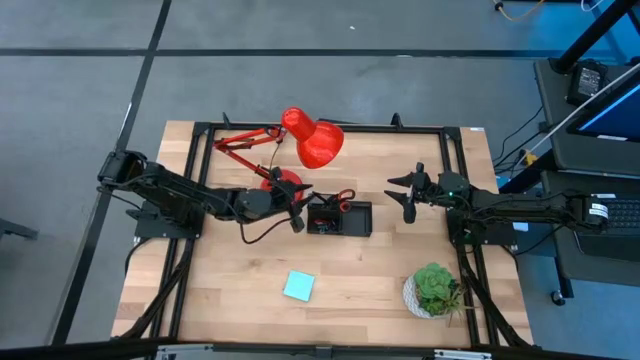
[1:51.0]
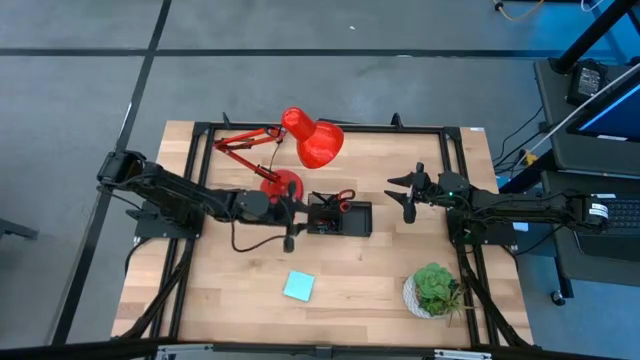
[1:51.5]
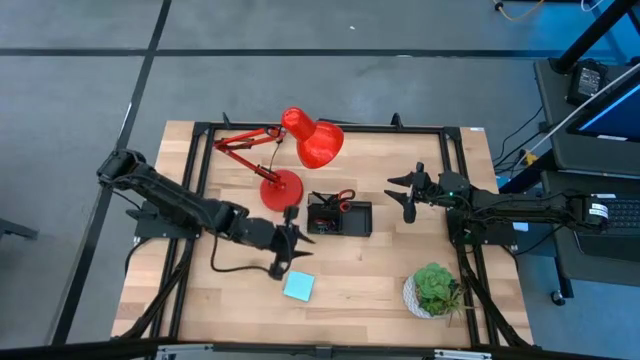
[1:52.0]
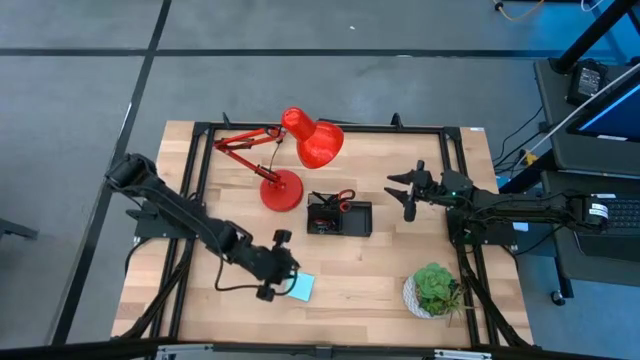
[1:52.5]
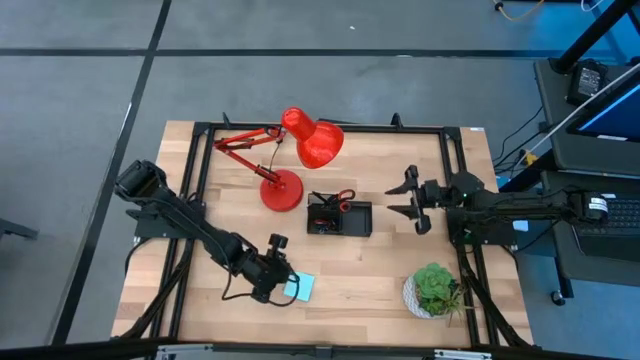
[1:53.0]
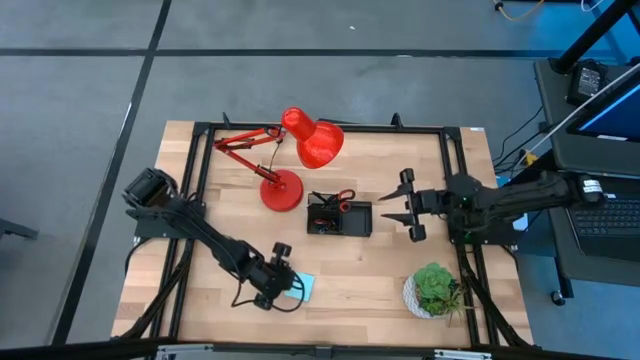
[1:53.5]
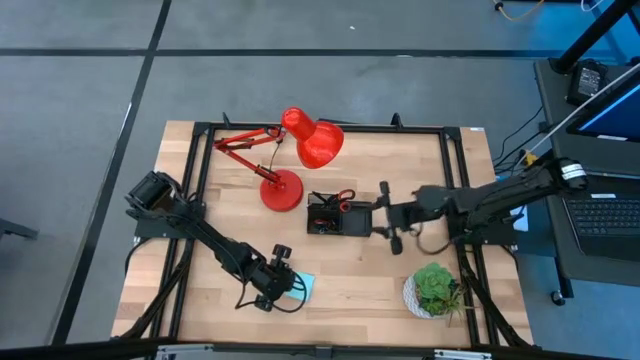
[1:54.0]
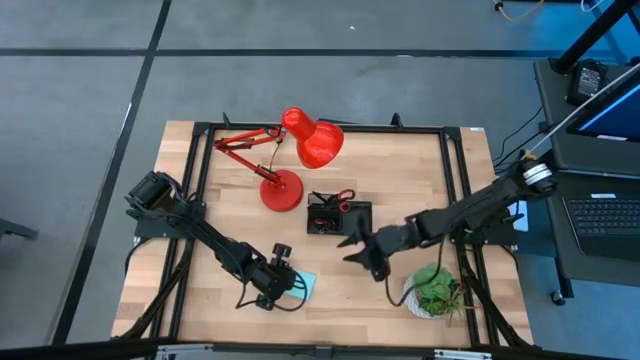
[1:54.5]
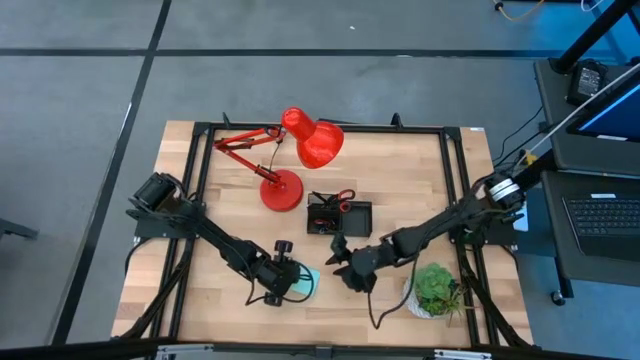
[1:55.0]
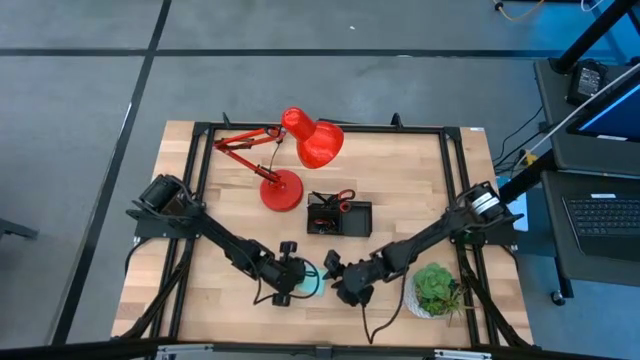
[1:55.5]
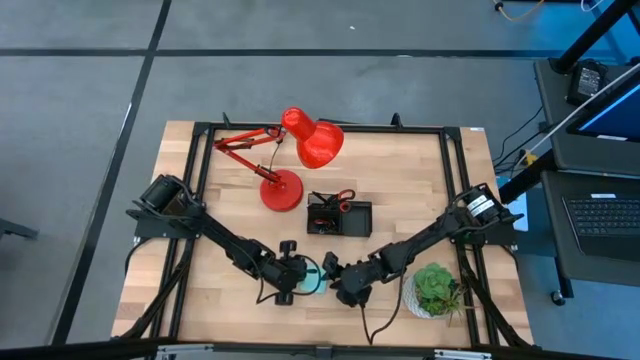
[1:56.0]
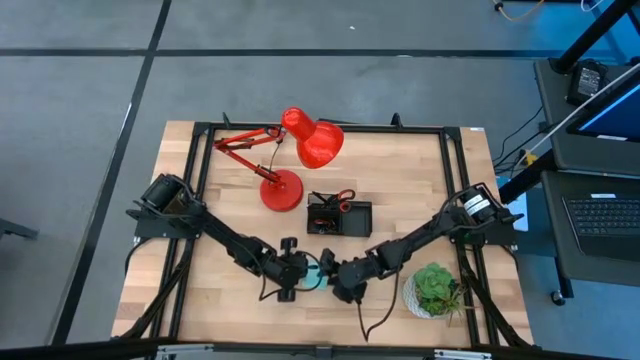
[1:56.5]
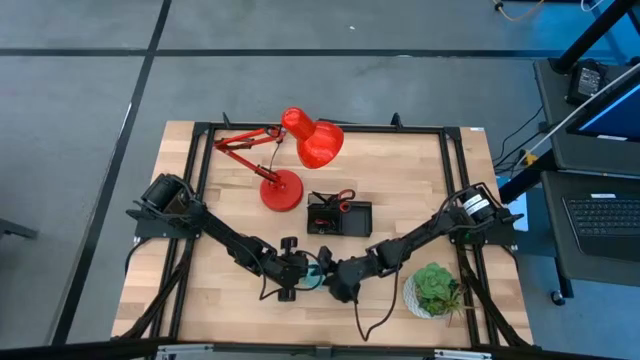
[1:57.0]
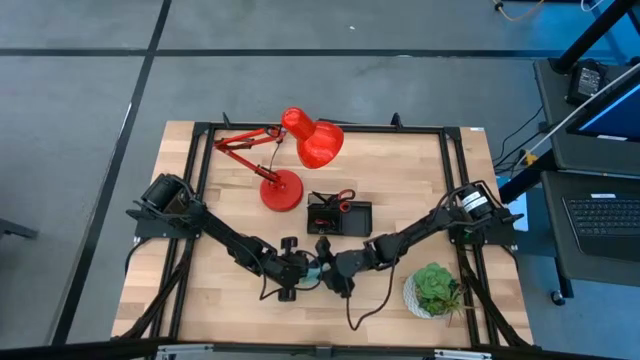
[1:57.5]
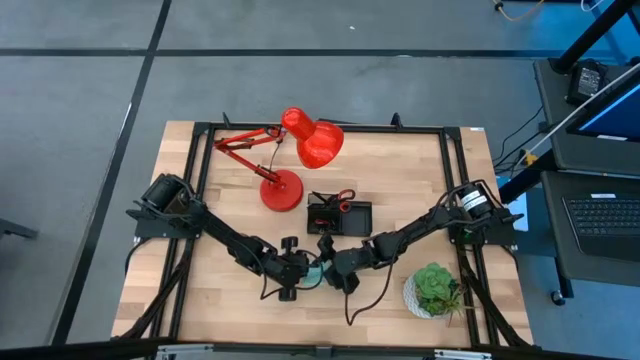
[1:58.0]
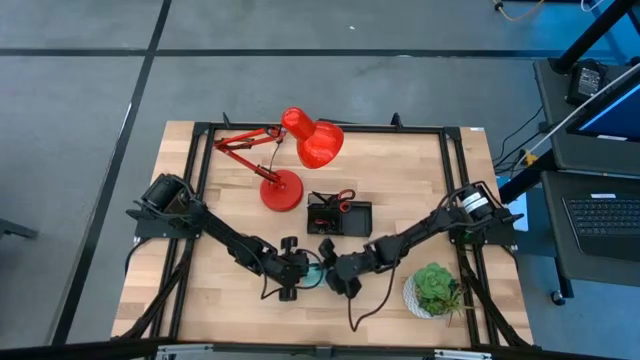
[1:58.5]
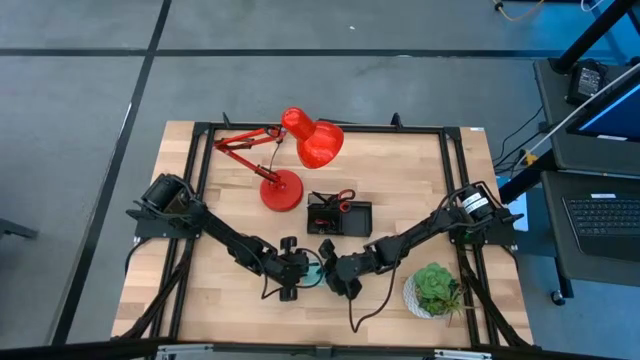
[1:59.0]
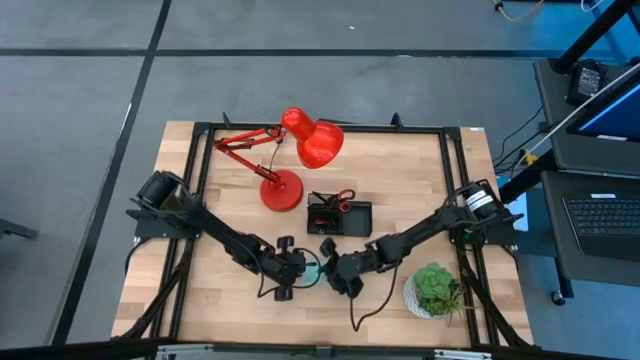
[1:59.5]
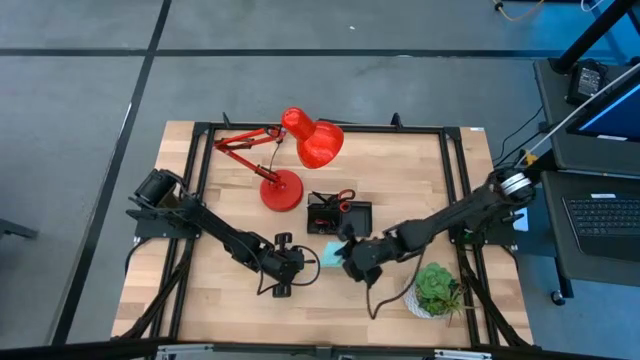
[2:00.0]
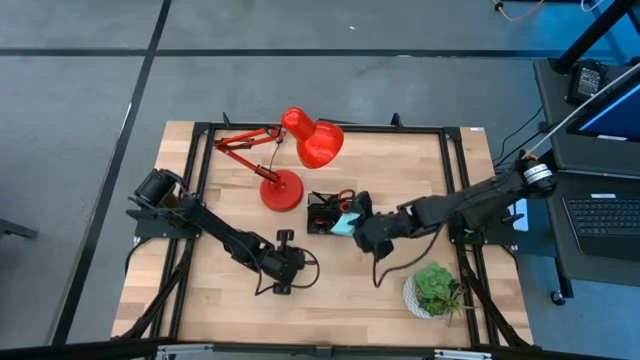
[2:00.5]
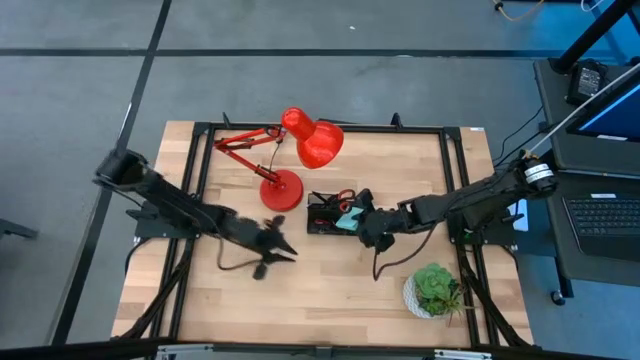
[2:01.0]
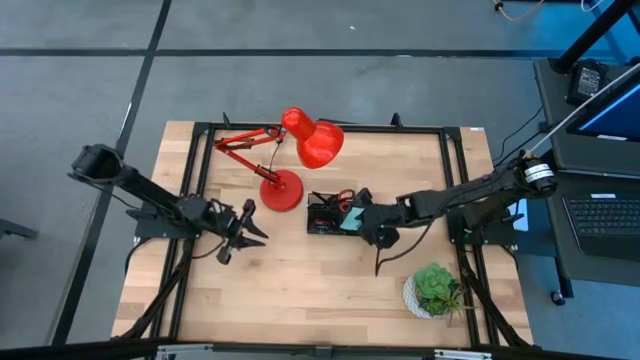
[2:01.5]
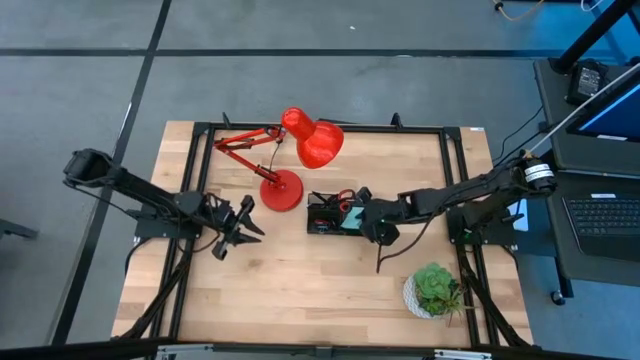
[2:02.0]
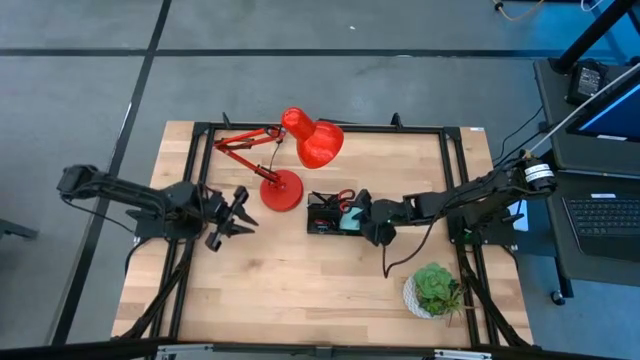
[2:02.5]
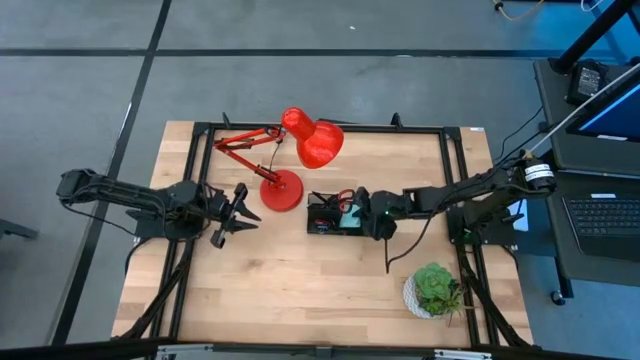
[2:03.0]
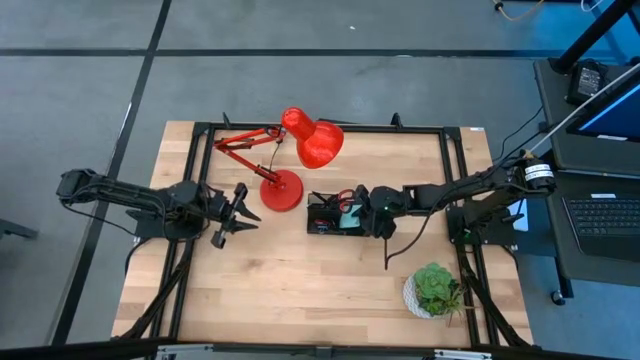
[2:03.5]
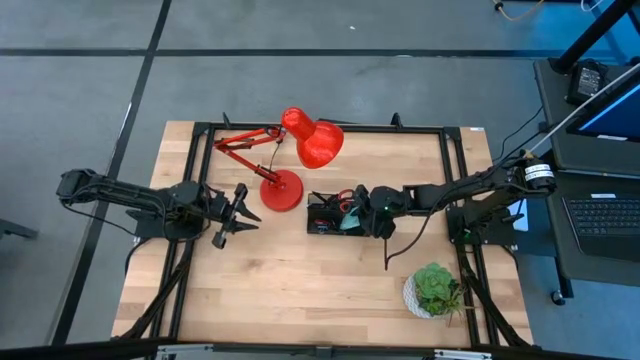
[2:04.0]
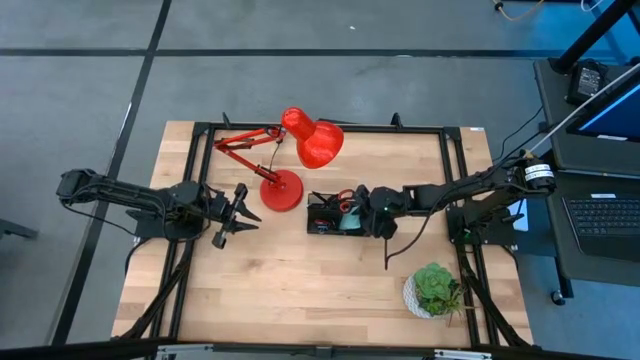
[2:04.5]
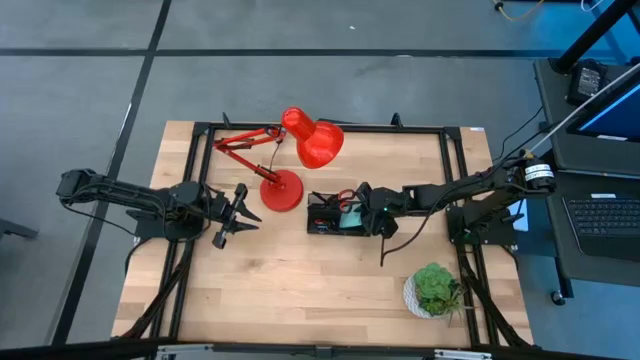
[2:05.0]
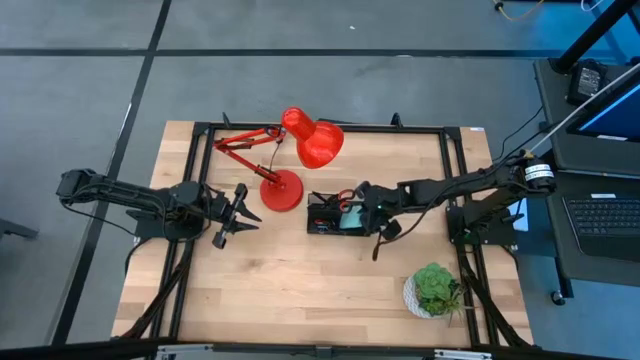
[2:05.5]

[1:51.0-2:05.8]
Task: Pick and place office supplies into organizer
Put the light blue notepad into the black desk organizer

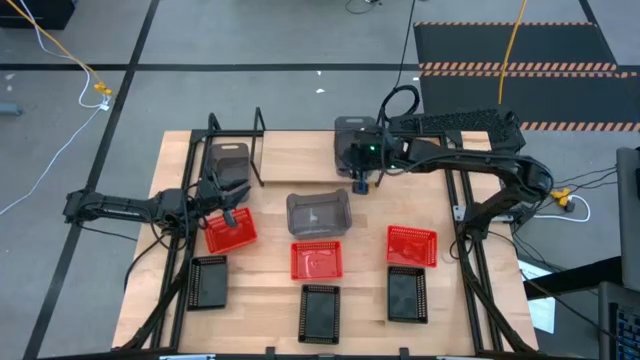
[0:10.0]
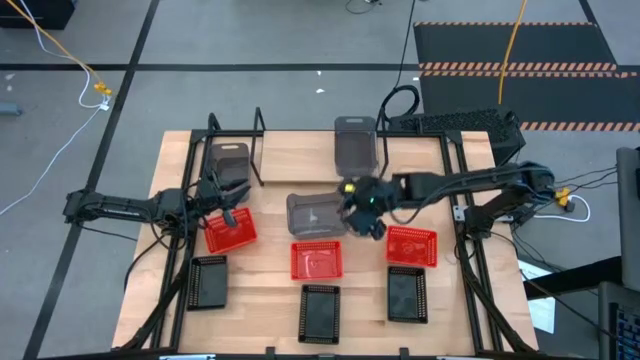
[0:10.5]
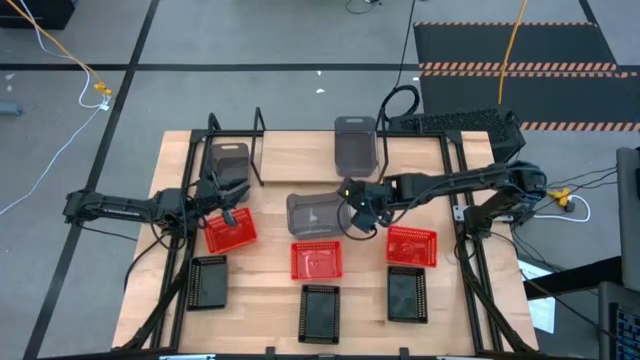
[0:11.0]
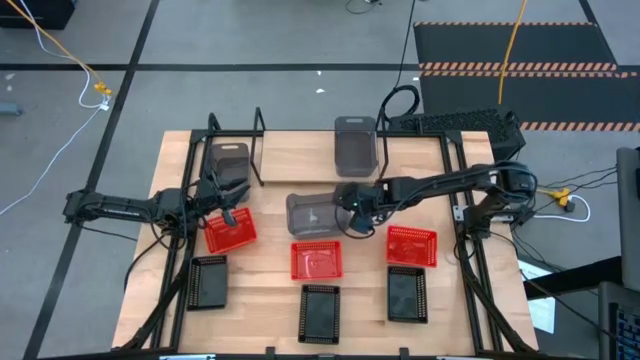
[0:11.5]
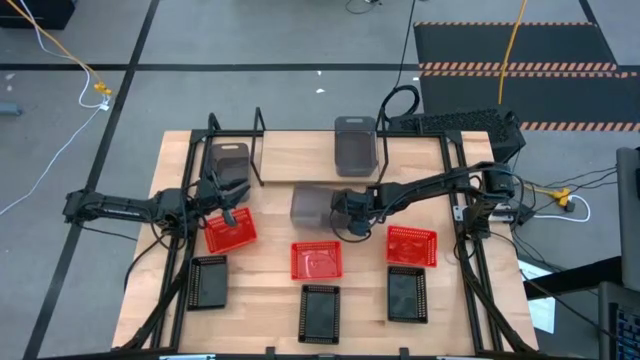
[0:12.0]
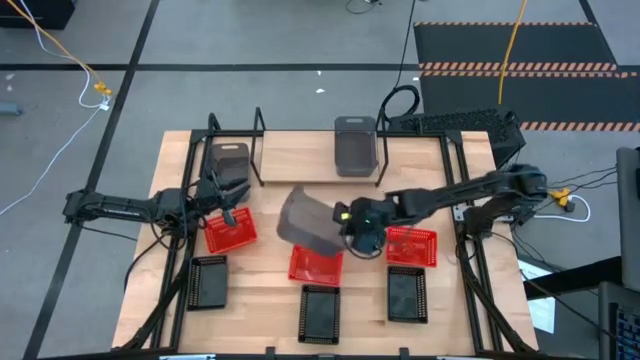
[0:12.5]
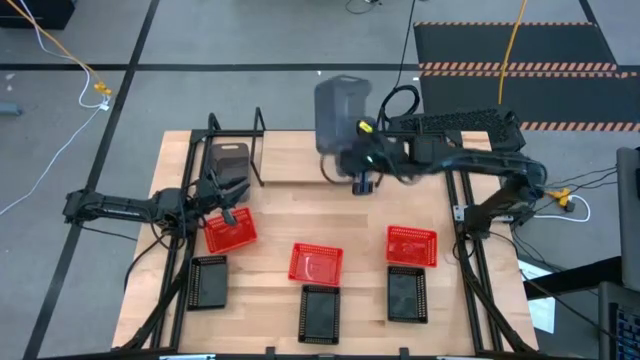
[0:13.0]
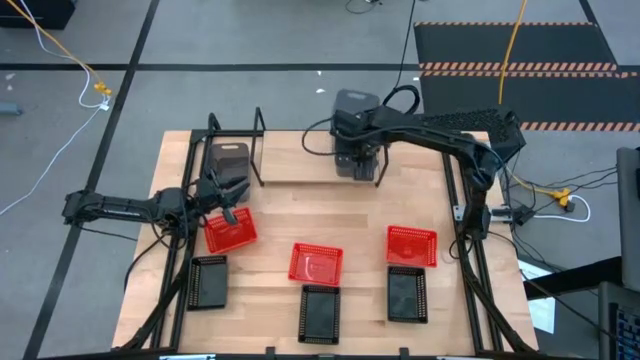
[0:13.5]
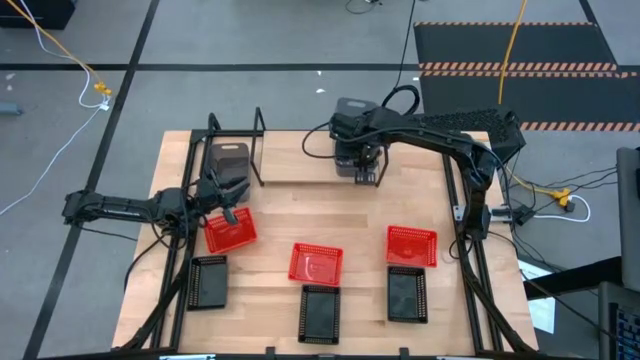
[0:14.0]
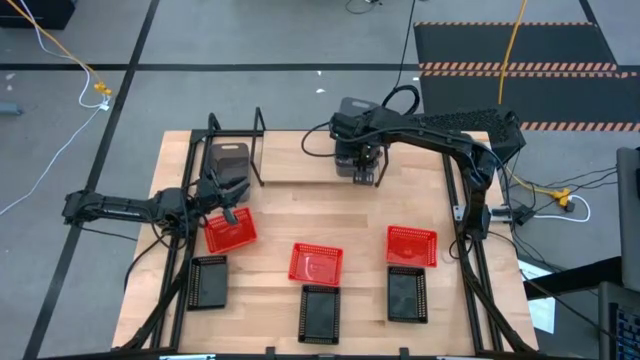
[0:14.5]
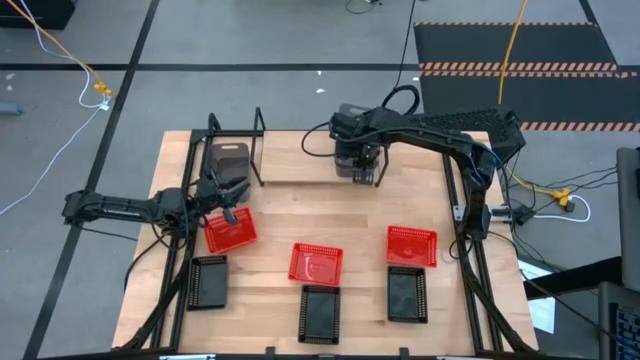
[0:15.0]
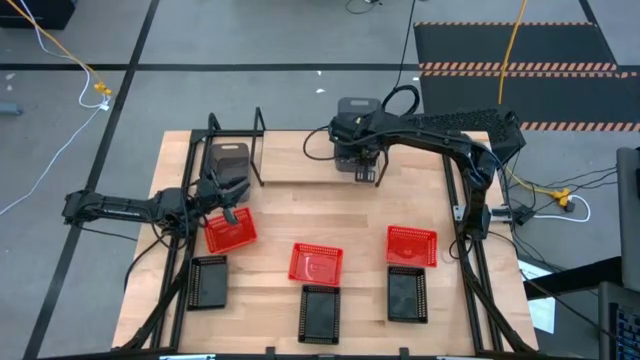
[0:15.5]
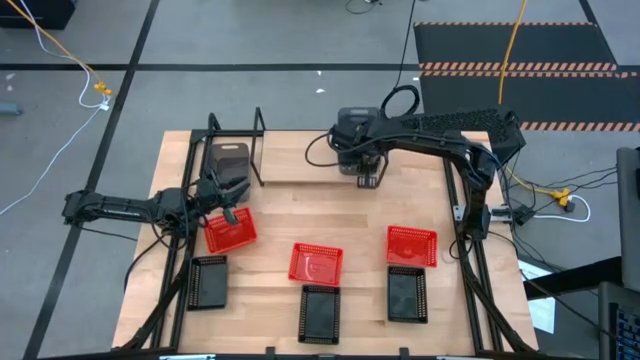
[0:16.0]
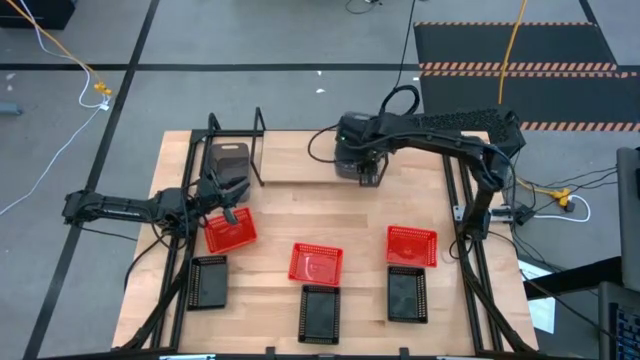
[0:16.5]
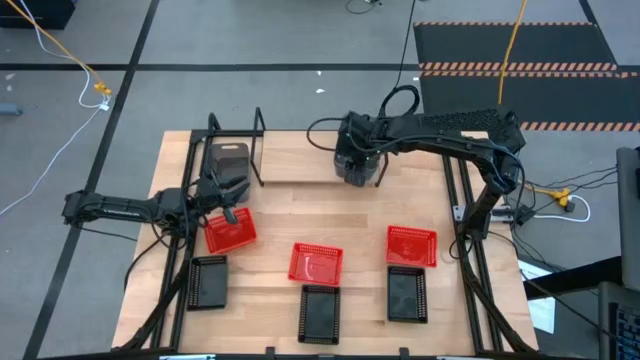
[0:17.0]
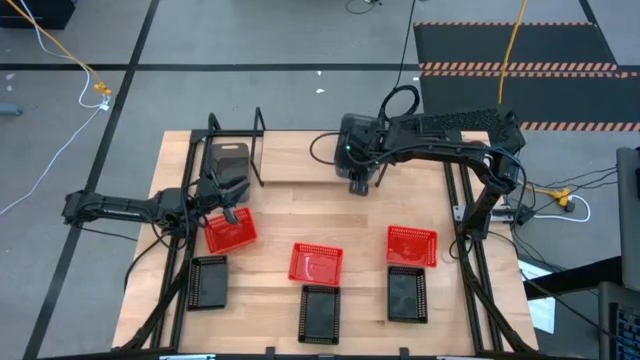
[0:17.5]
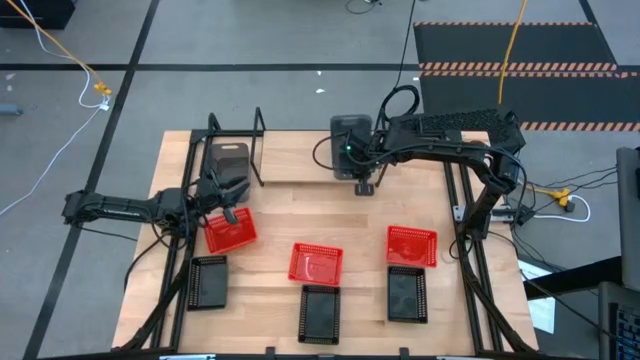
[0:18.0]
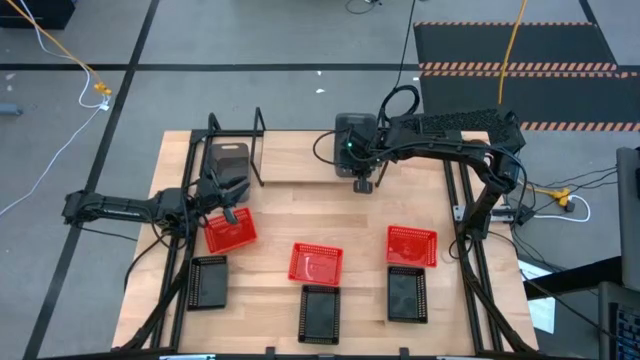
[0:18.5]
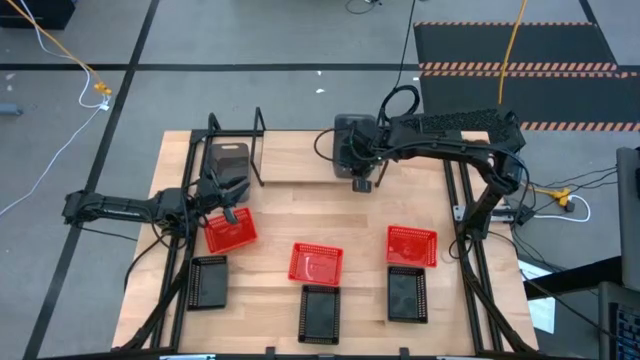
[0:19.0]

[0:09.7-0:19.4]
Task: Stack baskets on shelf by color
Stack the bottom transparent black bin on top of the transparent black bin on the shelf
